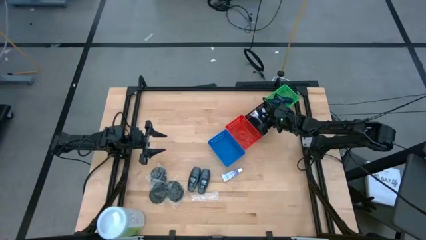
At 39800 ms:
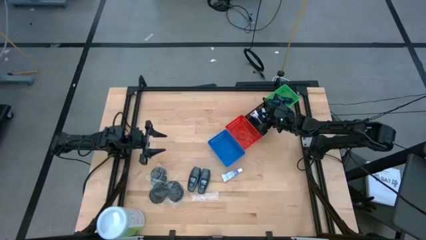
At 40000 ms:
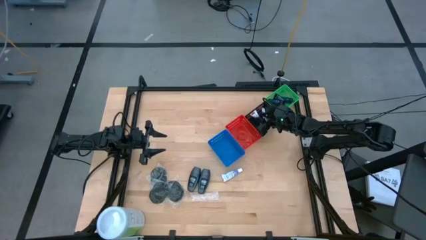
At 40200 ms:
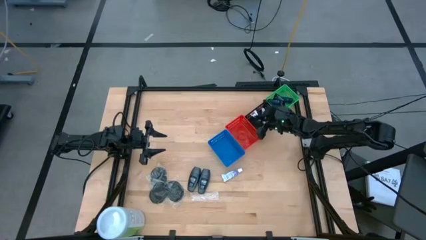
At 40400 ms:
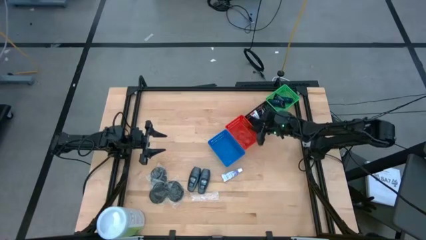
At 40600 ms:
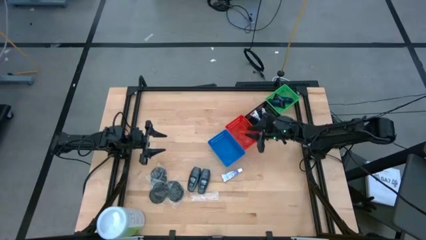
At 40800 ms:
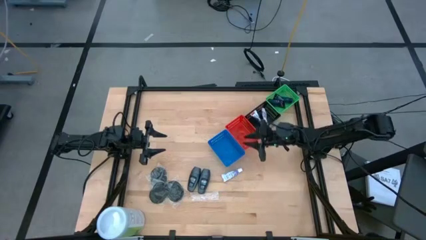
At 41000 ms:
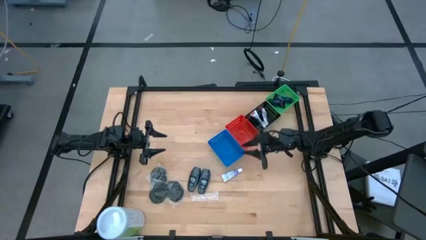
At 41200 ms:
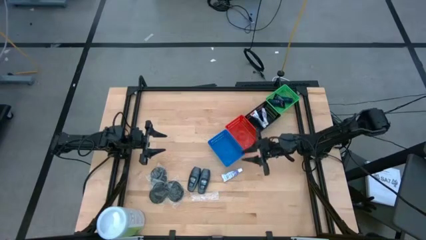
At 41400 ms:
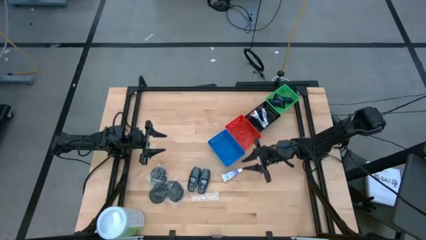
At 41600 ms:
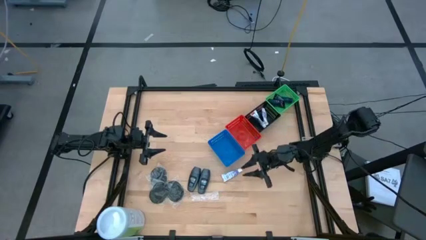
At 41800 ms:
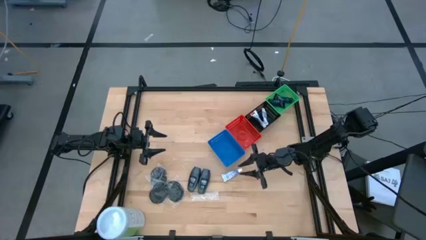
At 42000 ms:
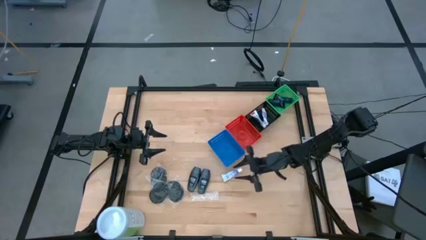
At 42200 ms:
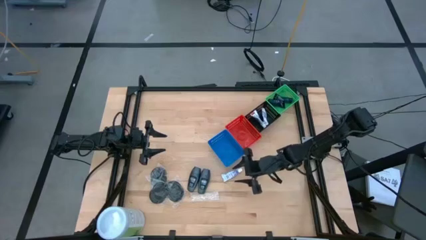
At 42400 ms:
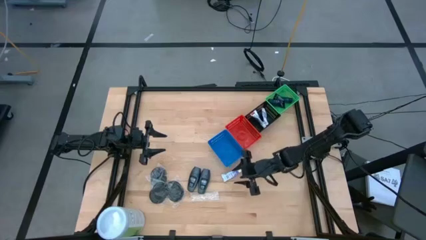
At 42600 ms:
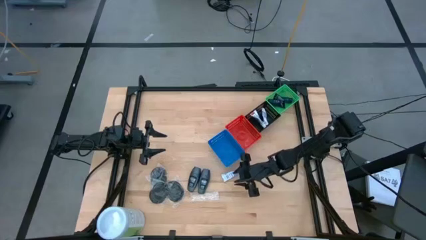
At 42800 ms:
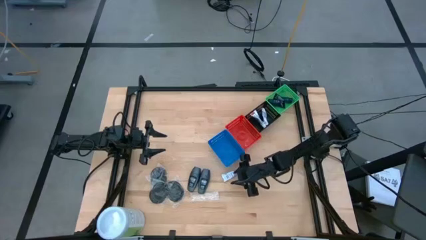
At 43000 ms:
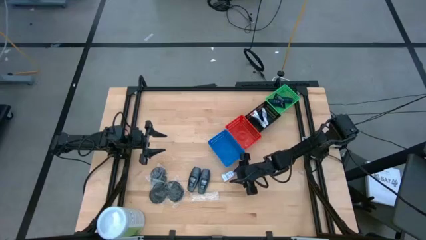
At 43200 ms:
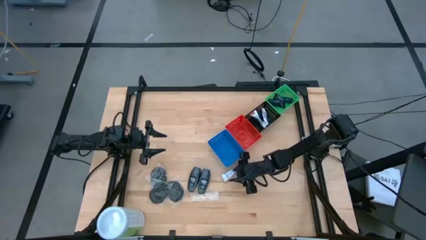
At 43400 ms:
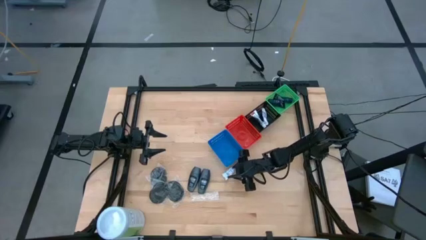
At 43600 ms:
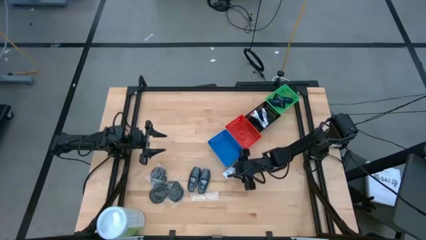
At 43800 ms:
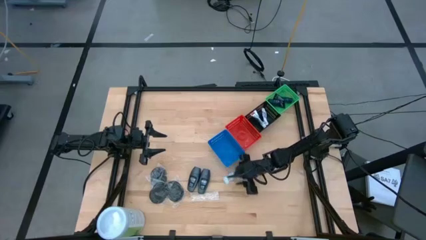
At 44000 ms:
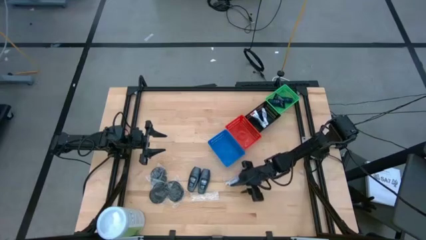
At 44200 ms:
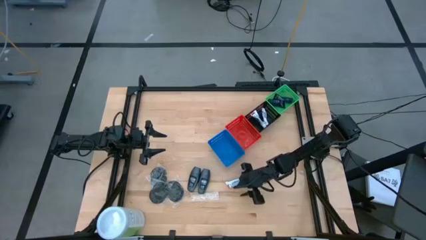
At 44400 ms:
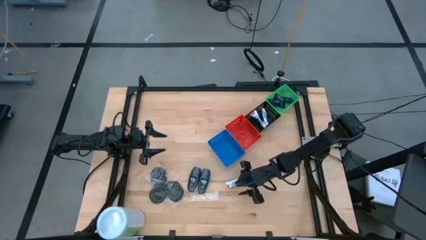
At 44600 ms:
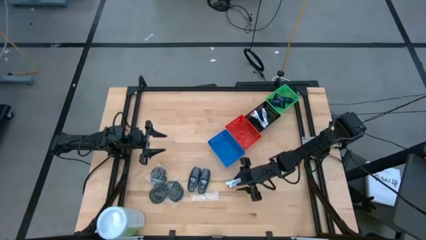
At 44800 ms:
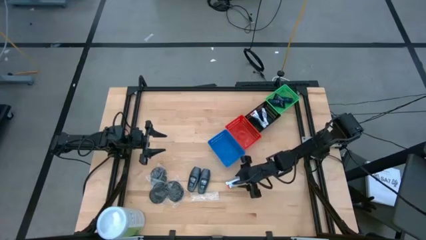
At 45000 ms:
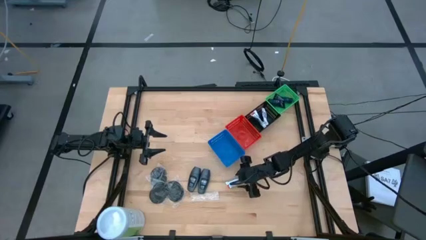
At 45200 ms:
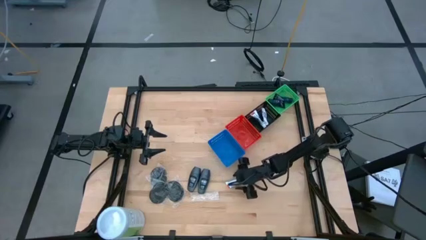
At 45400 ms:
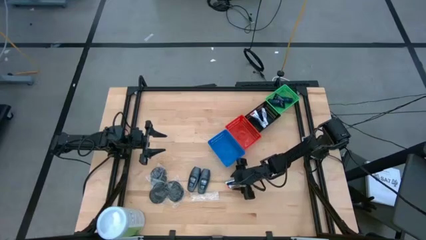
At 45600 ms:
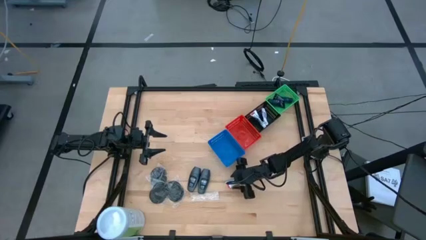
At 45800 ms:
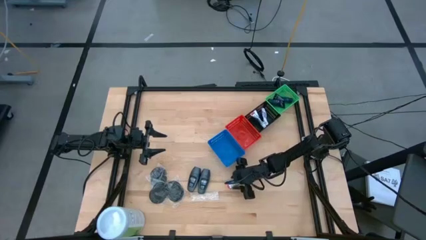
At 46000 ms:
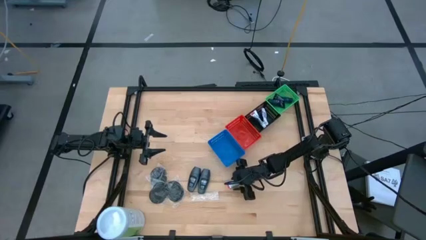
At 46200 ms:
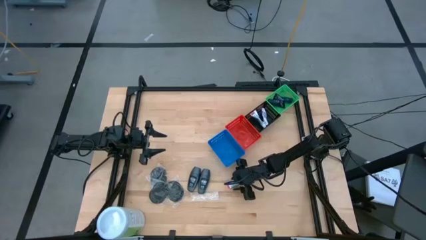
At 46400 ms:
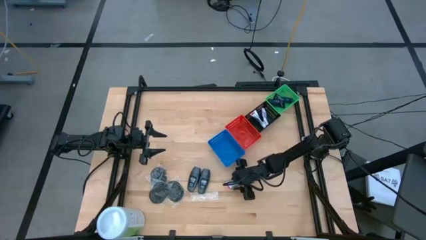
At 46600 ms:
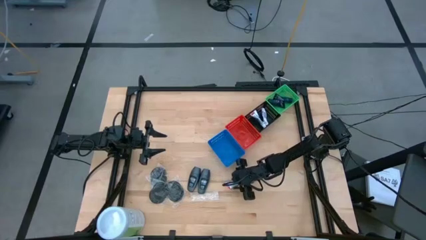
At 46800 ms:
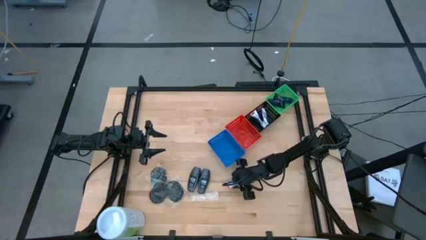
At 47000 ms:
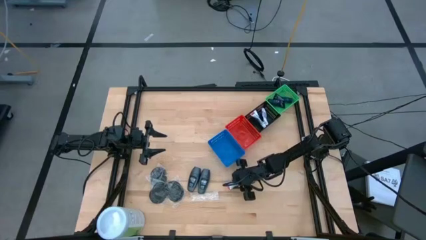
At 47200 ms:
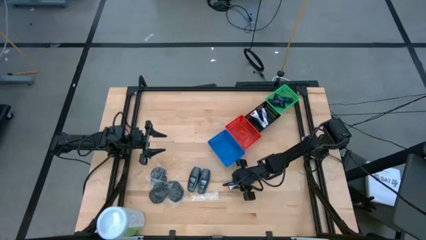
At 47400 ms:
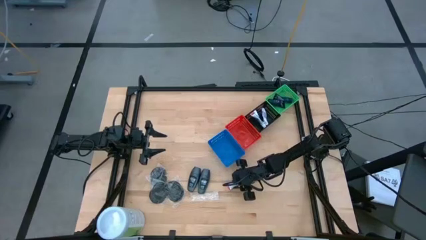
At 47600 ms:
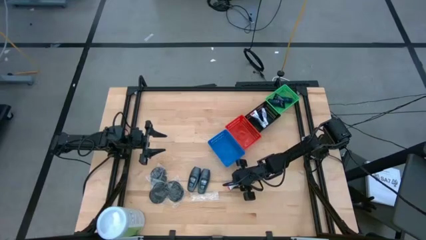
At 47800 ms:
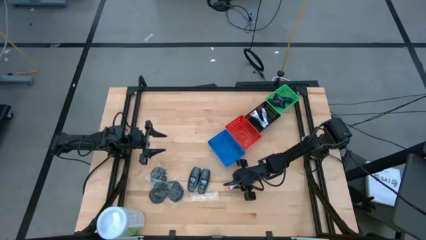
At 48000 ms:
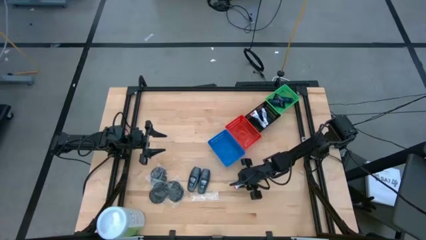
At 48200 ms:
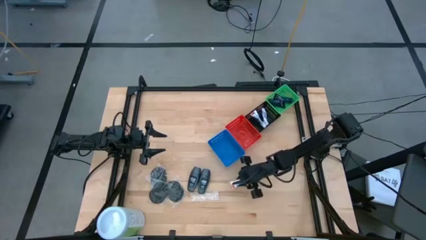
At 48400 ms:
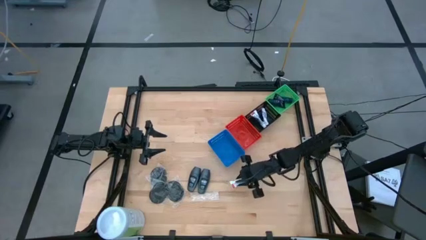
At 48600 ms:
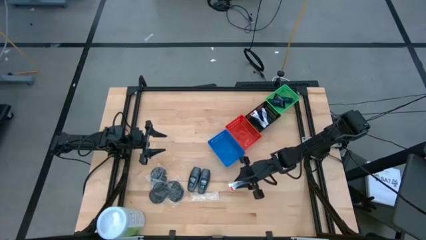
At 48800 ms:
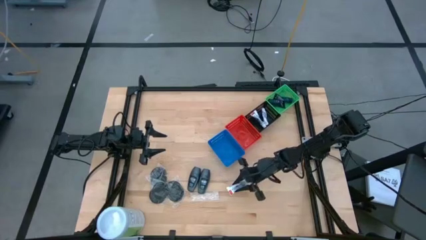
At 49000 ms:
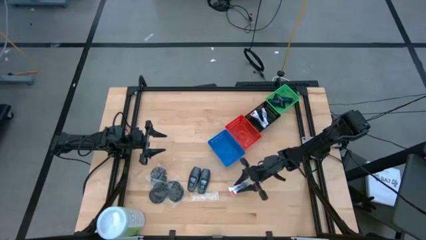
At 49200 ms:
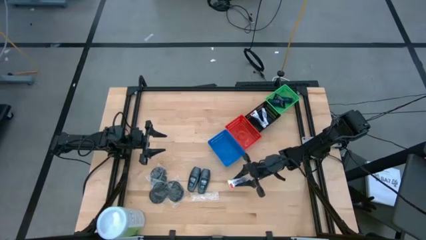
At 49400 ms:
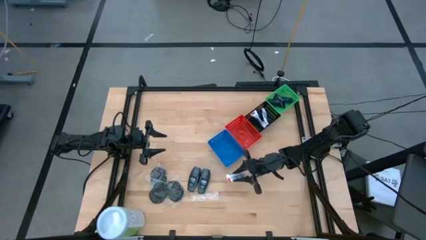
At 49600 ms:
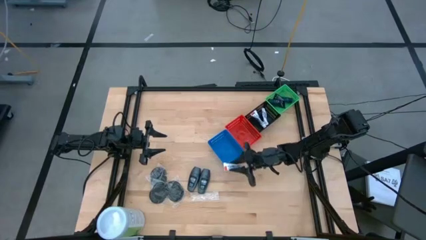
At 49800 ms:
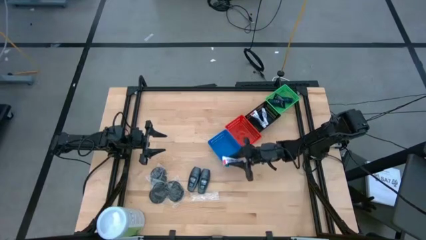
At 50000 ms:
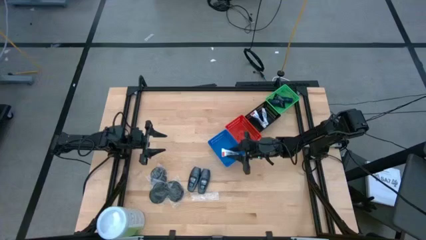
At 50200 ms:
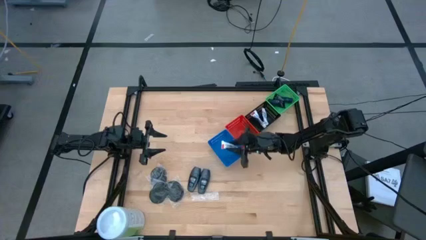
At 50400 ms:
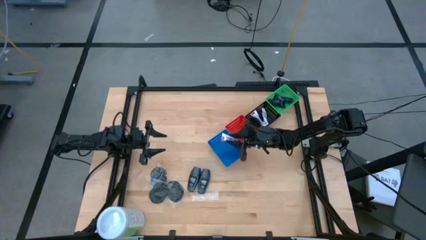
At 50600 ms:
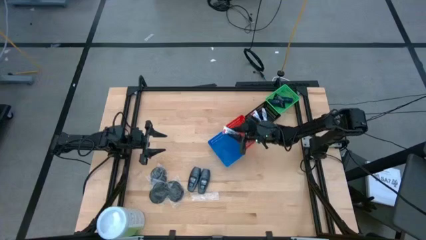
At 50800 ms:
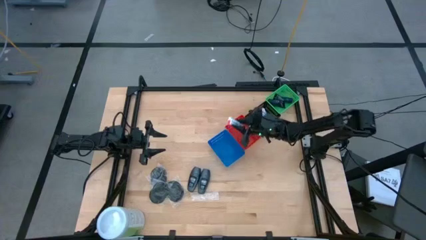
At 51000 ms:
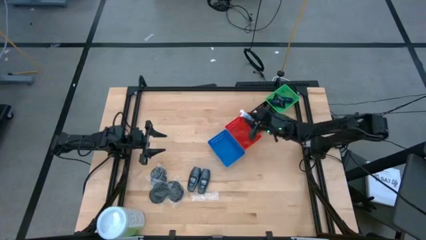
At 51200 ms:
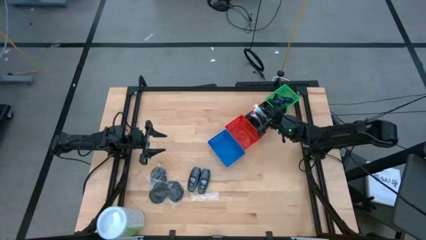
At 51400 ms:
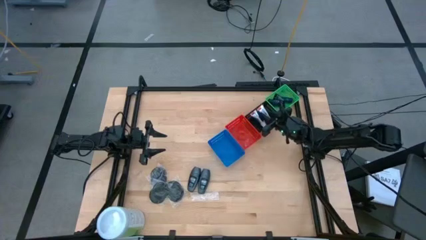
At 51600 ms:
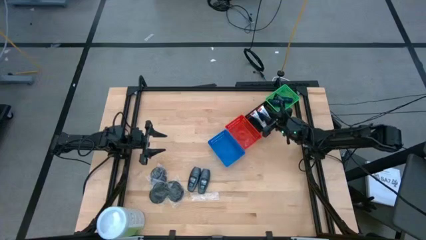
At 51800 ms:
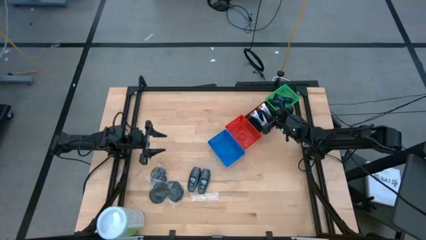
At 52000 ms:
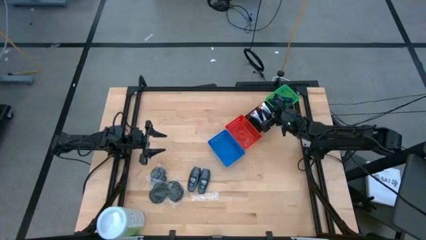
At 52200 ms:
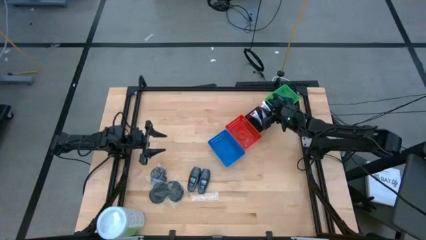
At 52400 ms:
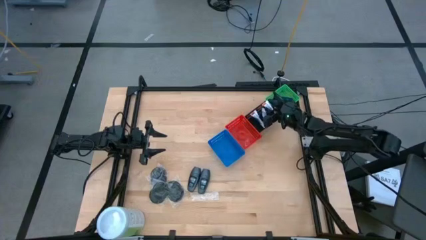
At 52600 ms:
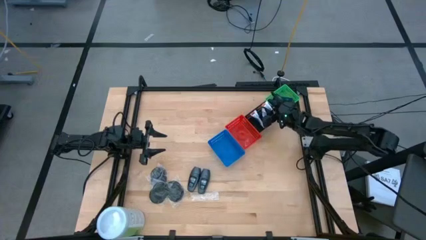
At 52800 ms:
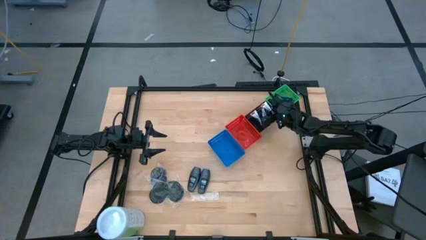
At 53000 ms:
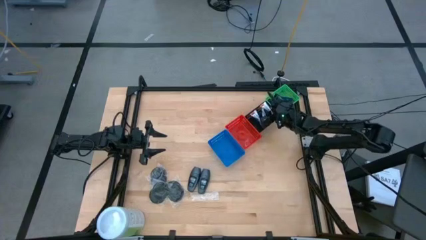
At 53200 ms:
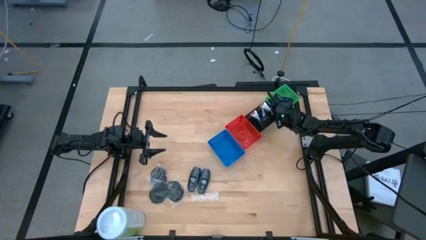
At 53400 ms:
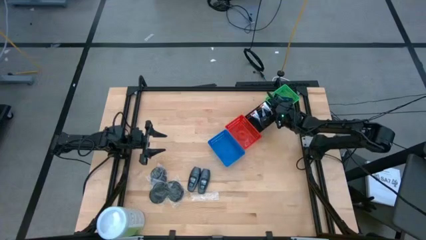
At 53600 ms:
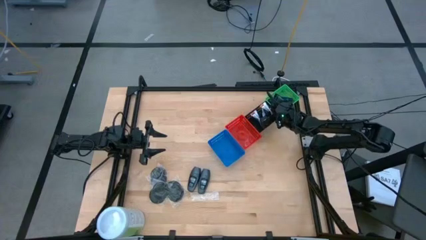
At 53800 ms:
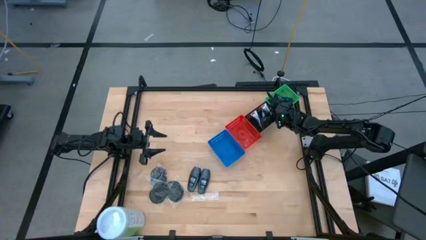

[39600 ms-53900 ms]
Task: Pick & Place Travel size toiletries
Put the toothpaste into the black bin
